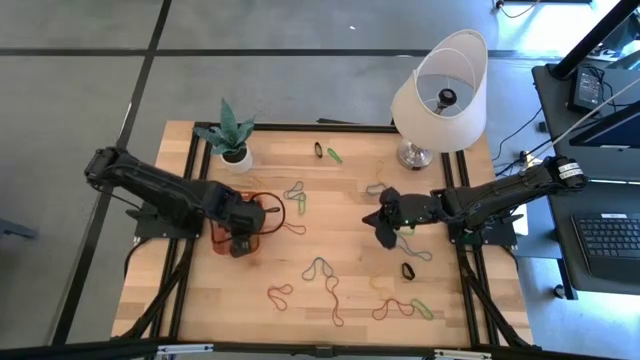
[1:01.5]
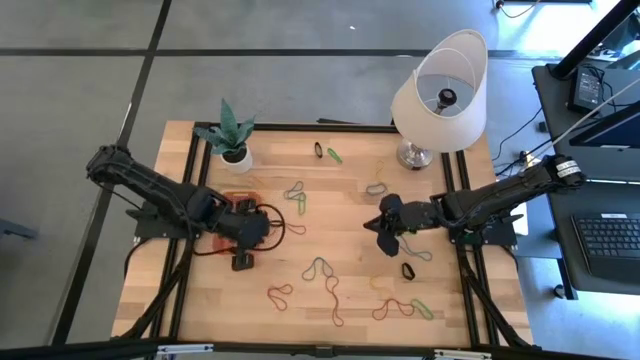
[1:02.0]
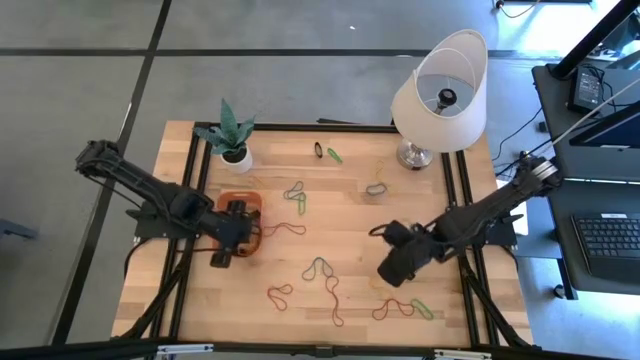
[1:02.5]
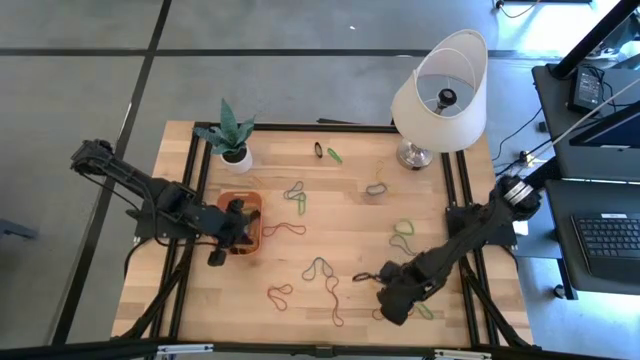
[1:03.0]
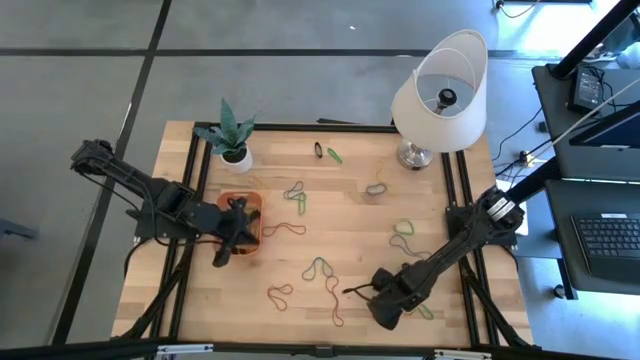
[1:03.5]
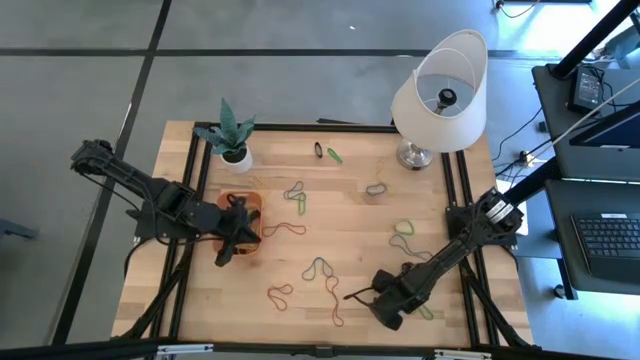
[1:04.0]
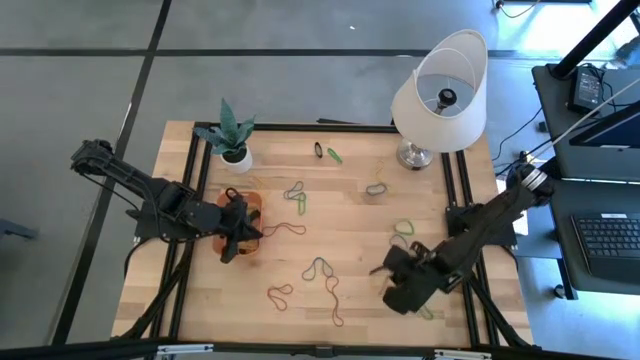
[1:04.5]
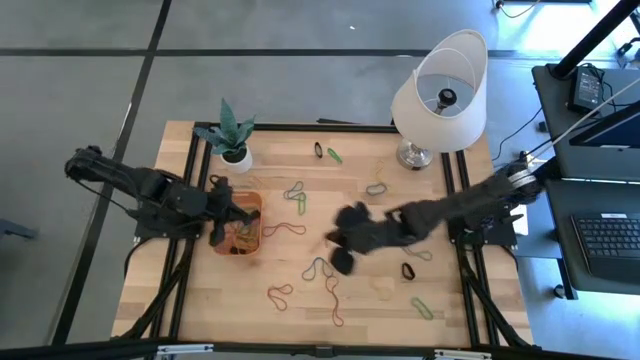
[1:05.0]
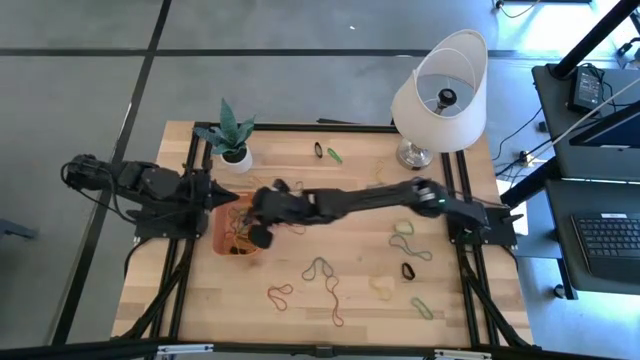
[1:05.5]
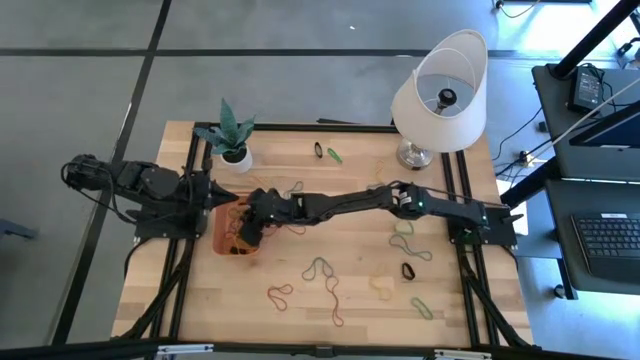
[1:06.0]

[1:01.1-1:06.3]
Task: Pick and place rubber bands into bin
Put the red rubber band into the orange bin

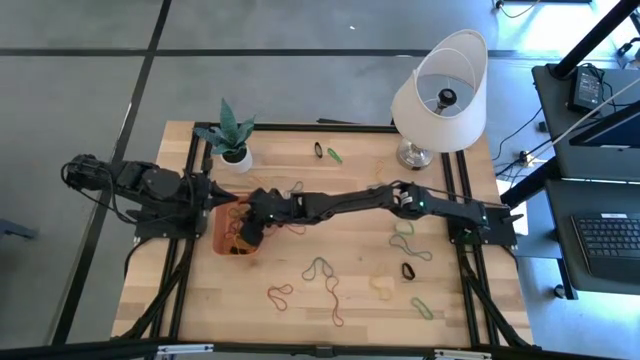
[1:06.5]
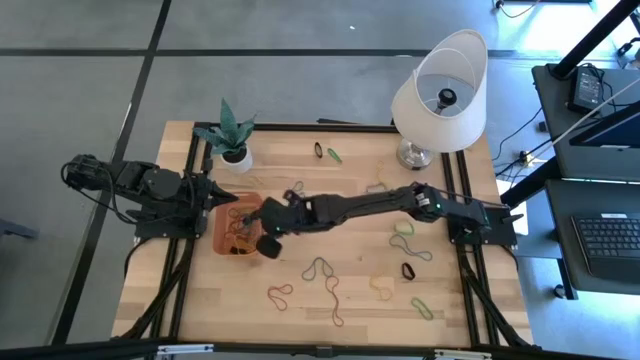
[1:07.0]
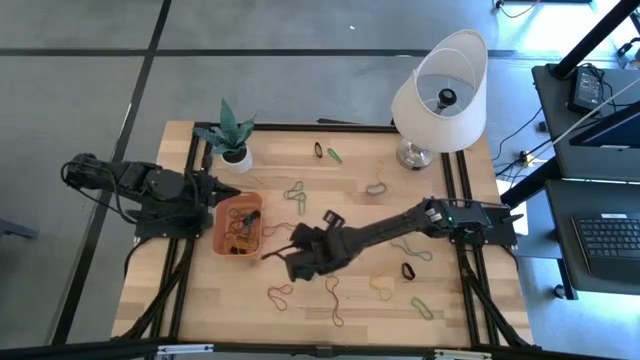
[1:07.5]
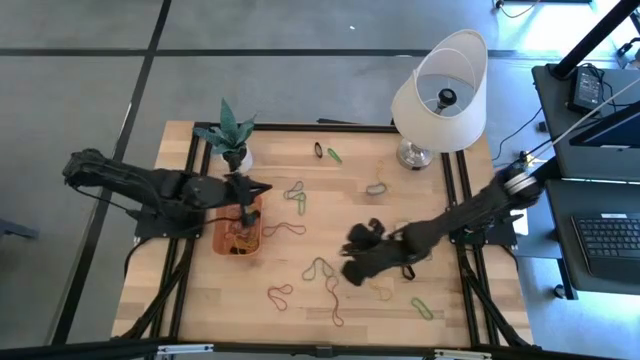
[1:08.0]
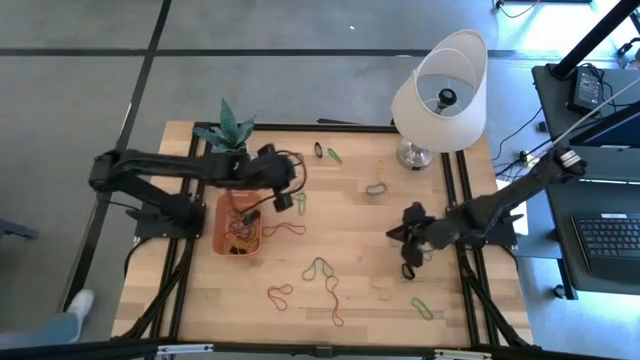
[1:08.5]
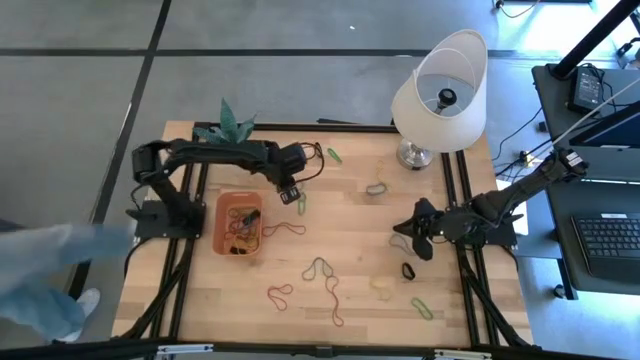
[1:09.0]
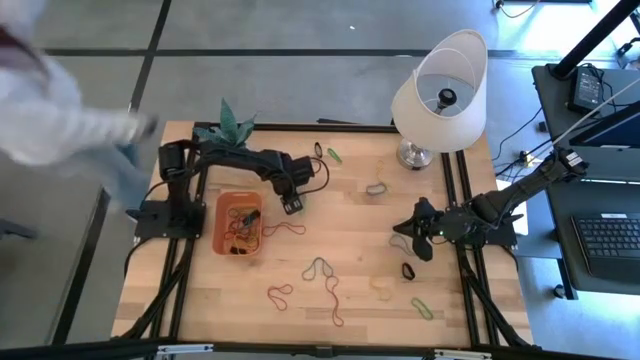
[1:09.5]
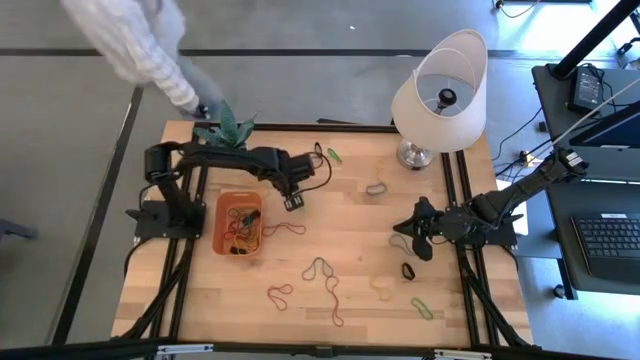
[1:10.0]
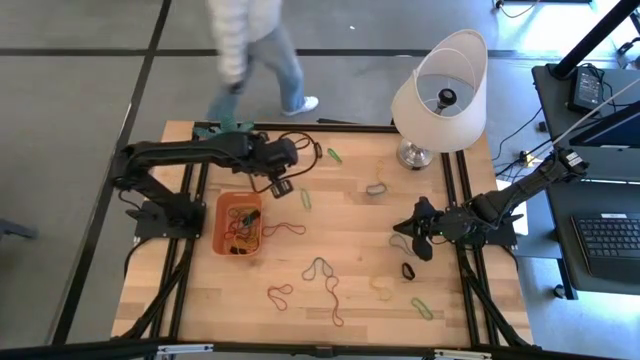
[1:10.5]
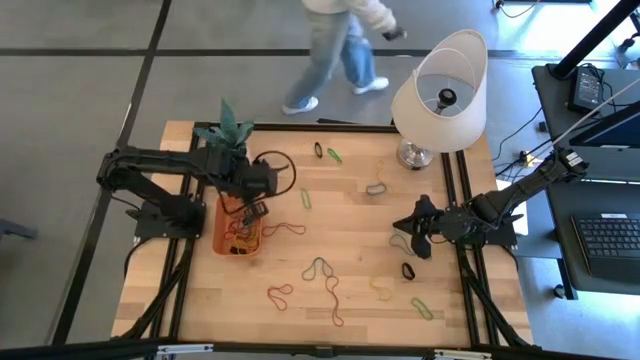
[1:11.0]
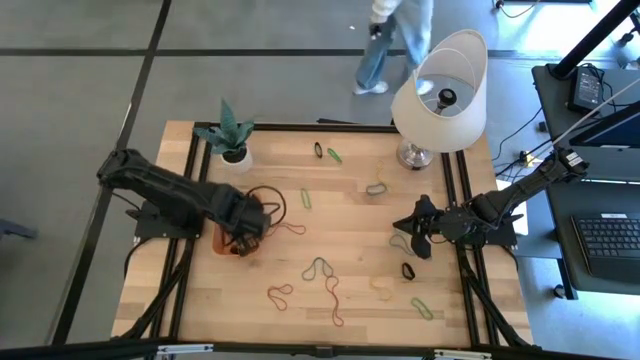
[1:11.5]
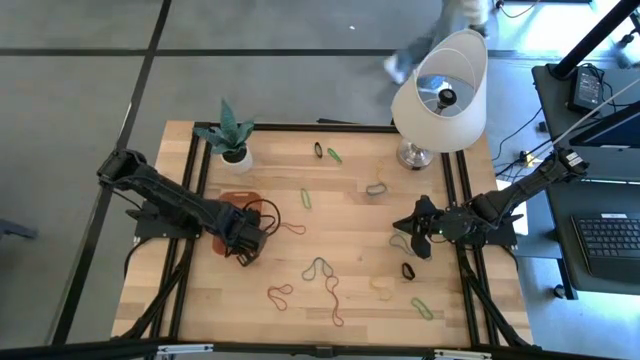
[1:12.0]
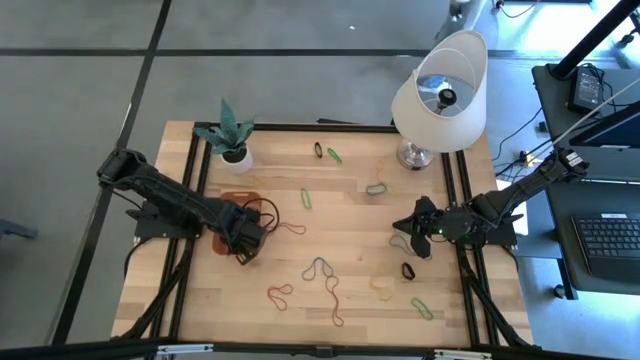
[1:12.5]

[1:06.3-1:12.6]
Put the blue rubber band into the orange bin

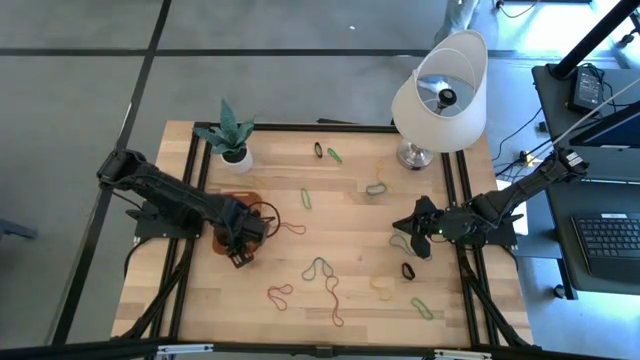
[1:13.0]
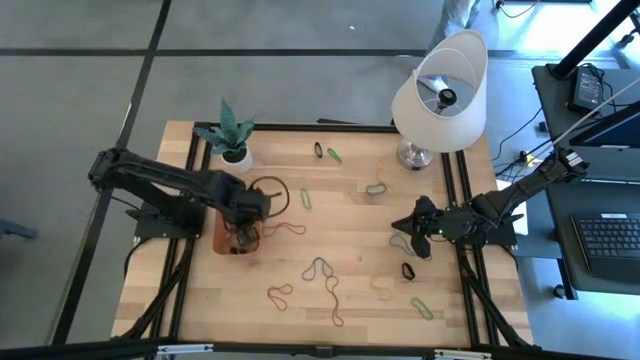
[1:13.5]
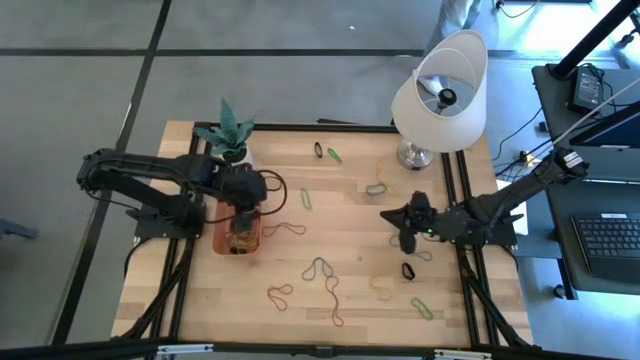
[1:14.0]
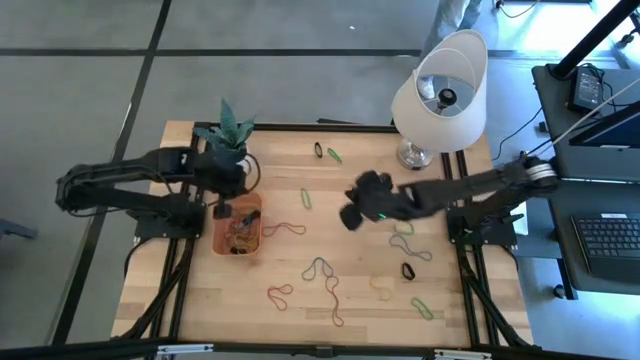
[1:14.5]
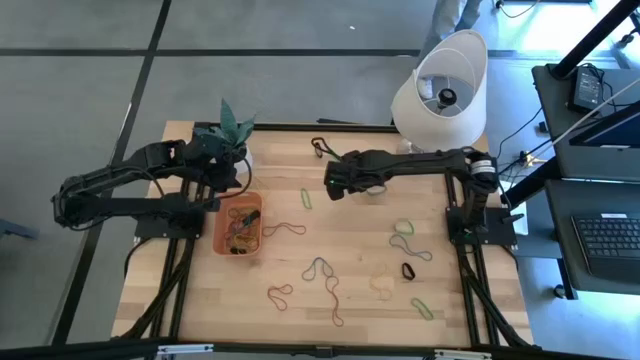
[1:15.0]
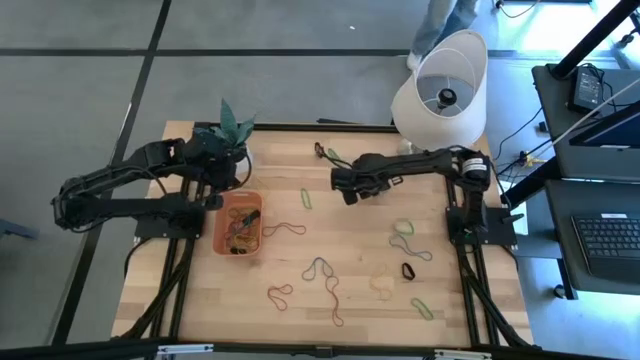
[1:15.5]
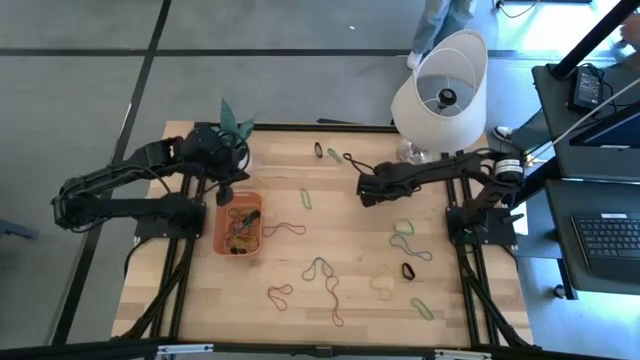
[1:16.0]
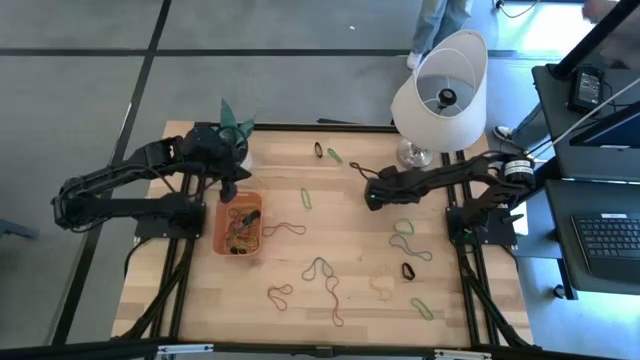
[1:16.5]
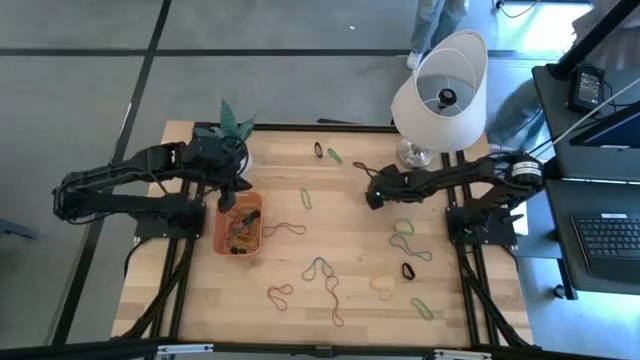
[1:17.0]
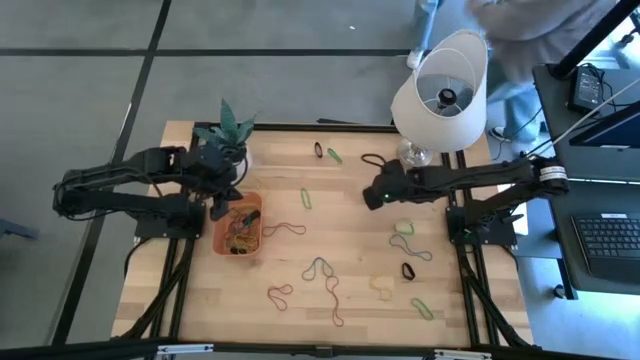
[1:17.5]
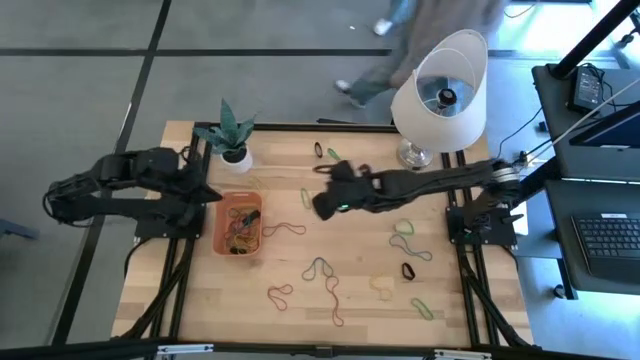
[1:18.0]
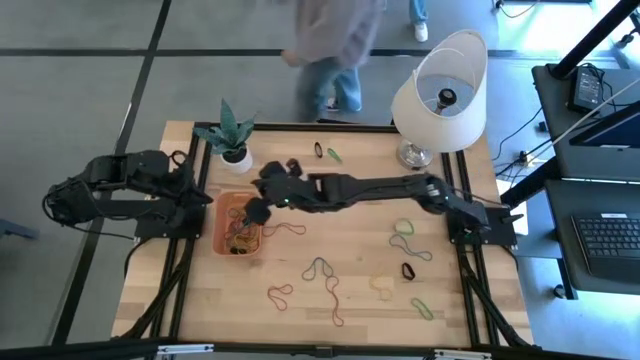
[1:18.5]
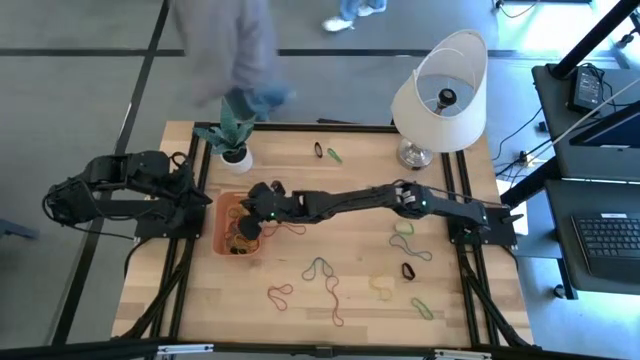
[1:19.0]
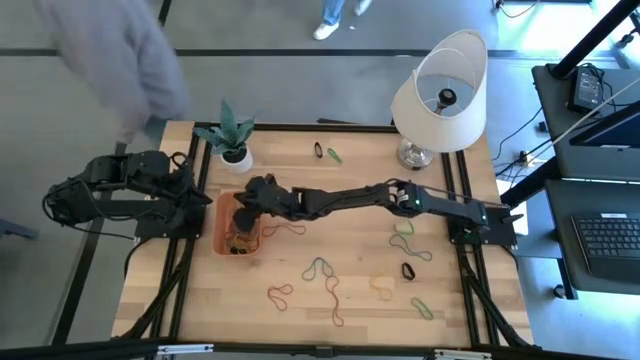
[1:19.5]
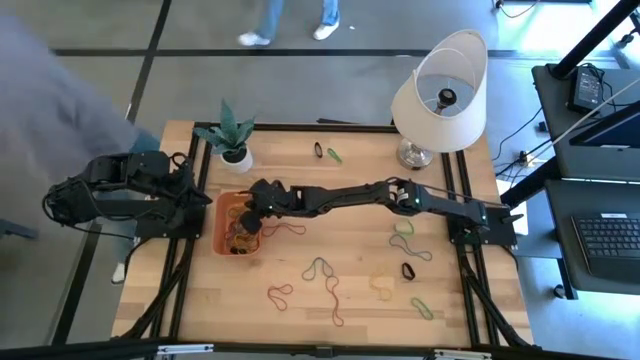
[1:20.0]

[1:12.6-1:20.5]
Put the yellow rubber band into the orange bin

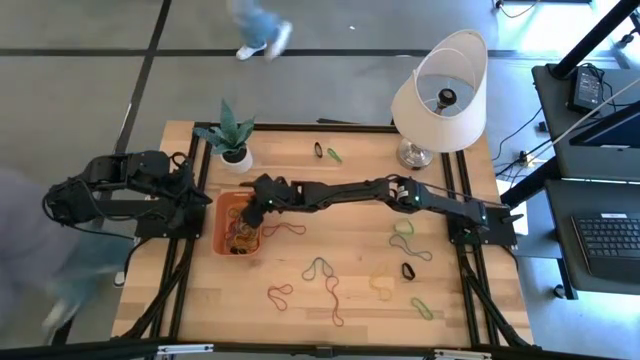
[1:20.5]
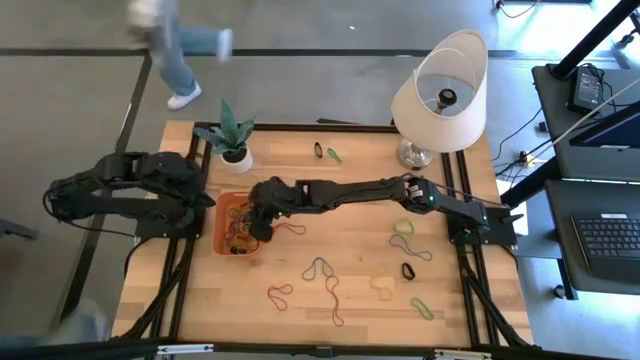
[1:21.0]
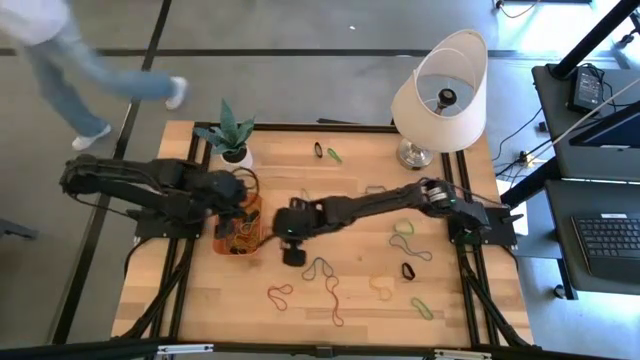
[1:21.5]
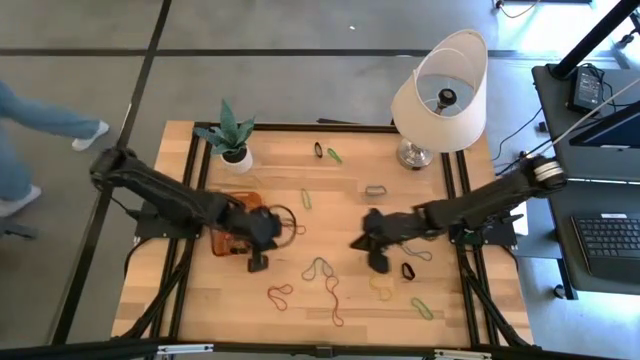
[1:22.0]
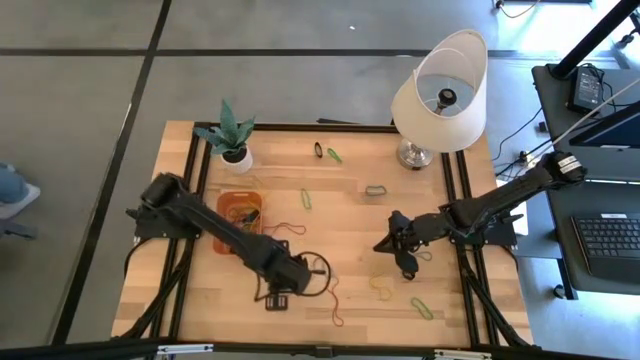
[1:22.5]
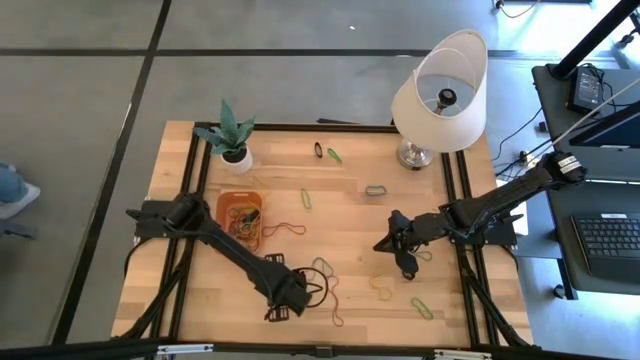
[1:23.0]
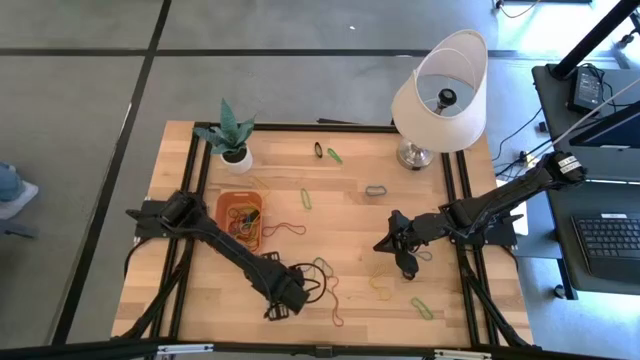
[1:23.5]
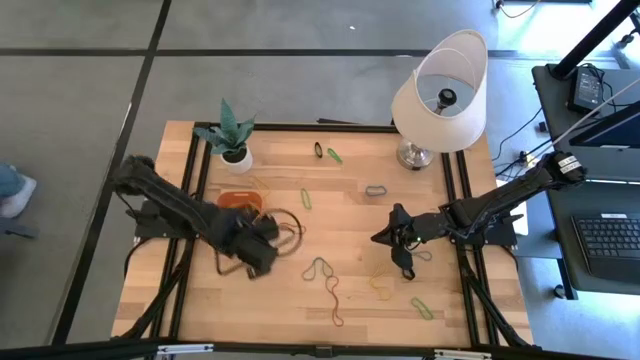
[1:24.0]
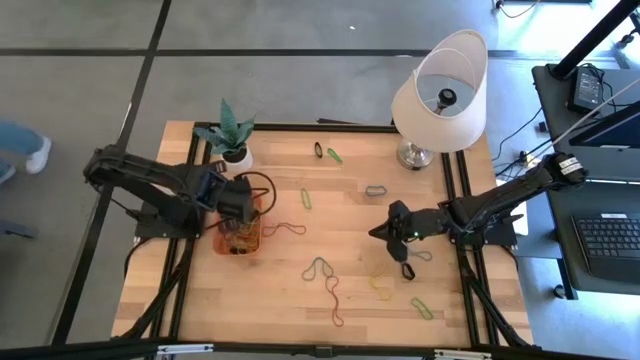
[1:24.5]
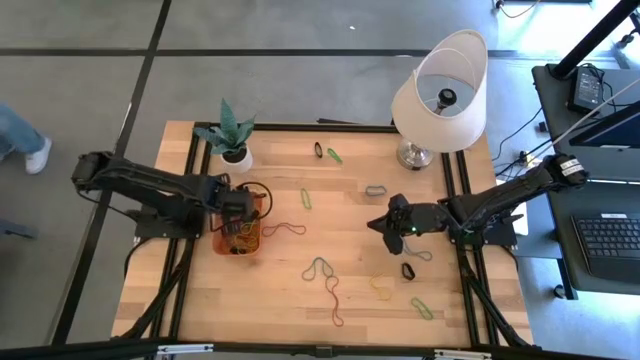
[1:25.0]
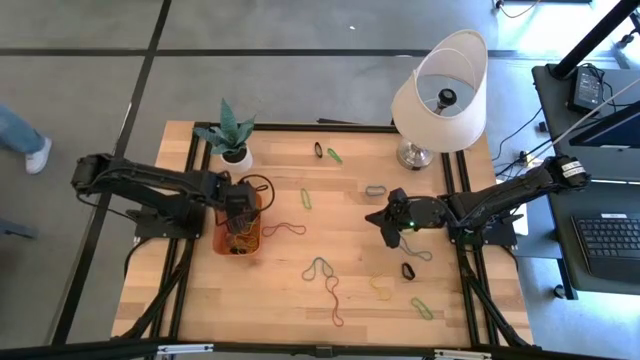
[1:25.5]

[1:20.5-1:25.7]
Put the red rubber band into the orange bin
